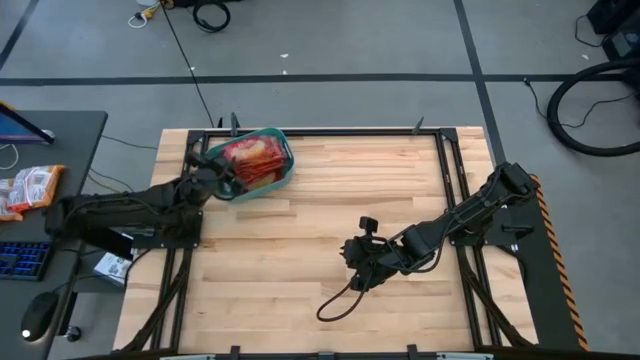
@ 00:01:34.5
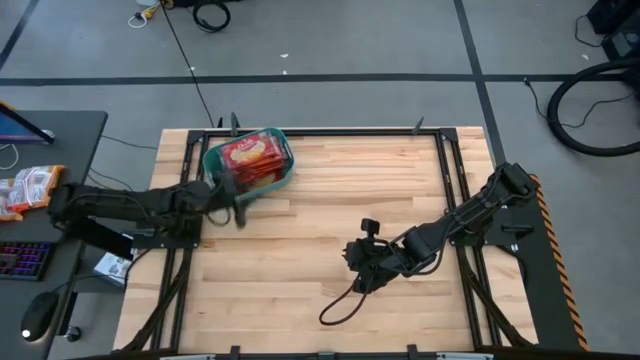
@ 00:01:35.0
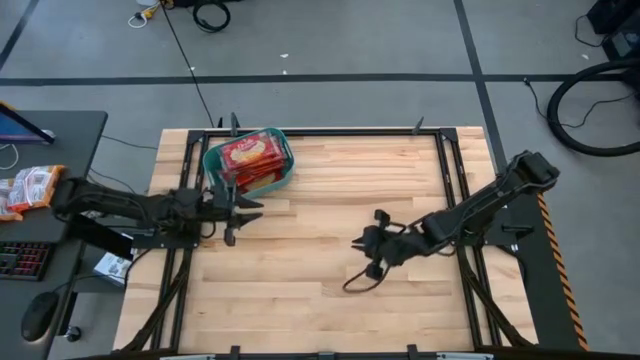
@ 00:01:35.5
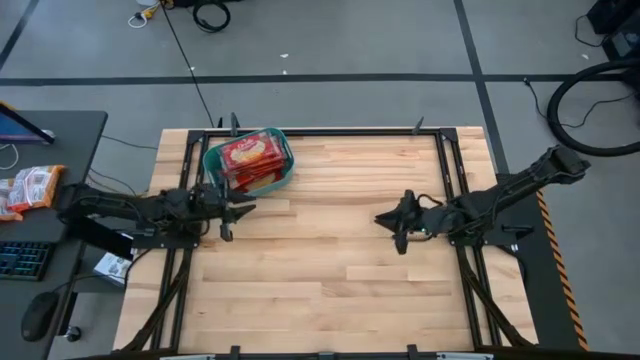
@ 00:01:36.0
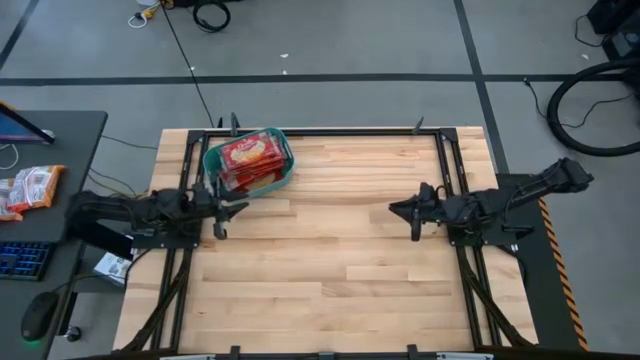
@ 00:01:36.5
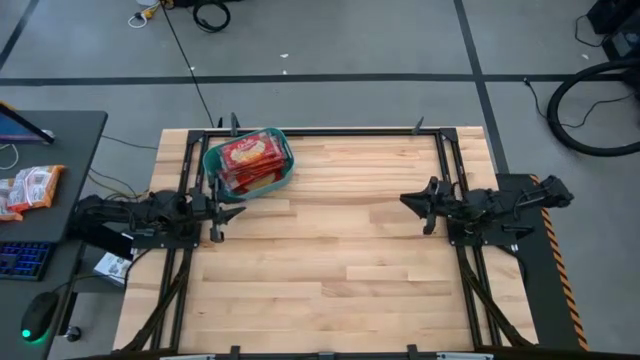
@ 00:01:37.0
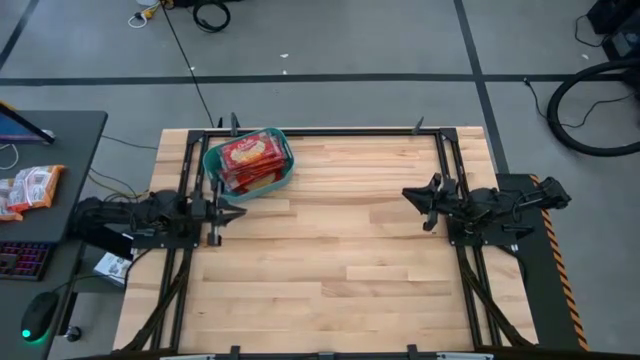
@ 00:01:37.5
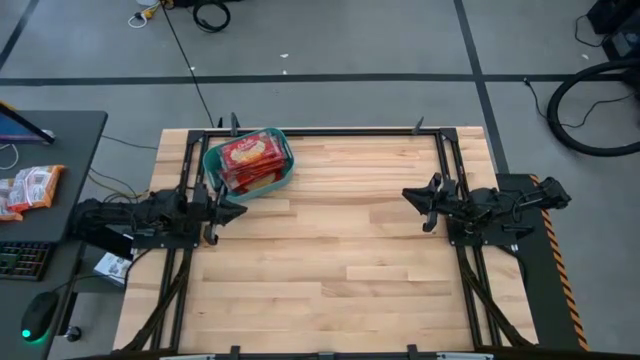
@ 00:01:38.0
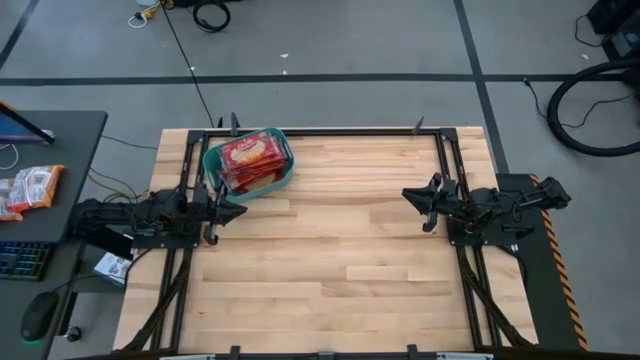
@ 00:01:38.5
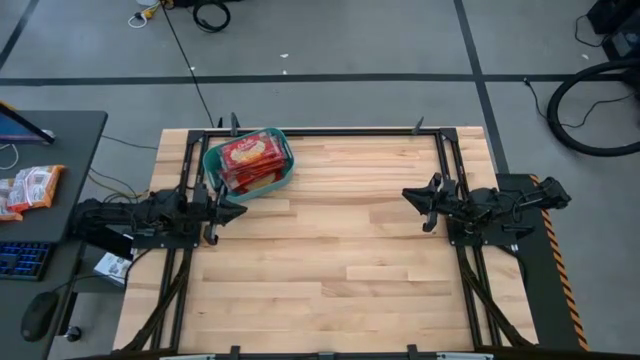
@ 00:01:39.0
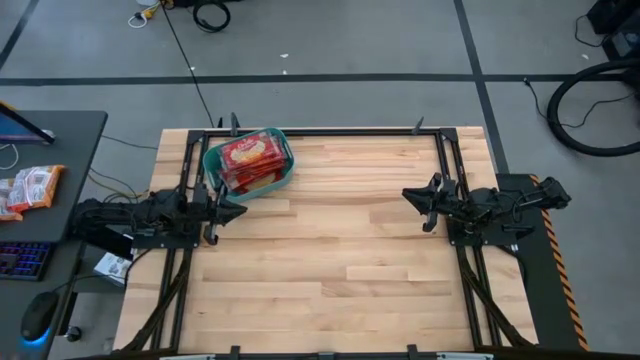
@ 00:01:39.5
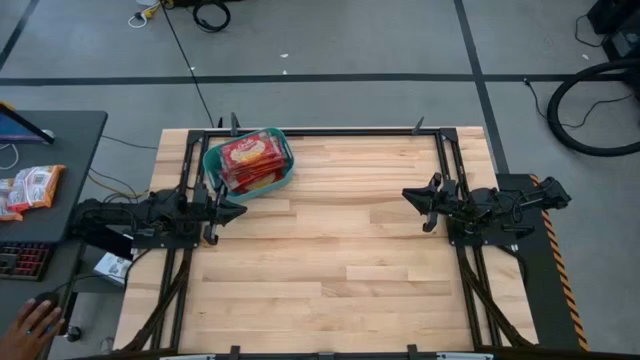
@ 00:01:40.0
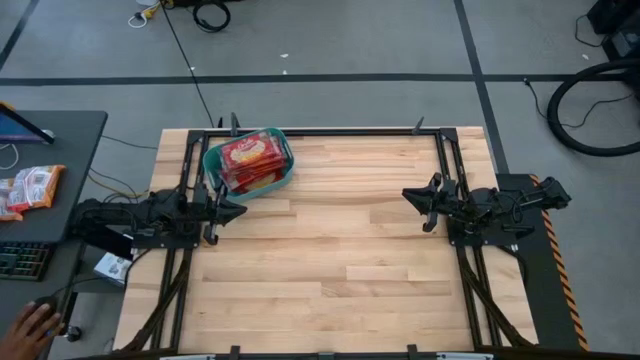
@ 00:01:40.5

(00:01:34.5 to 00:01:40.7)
Task: Sort popcorn bags into baskets
Return to Home Position

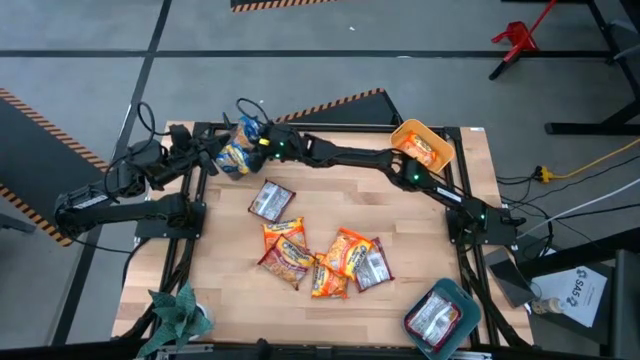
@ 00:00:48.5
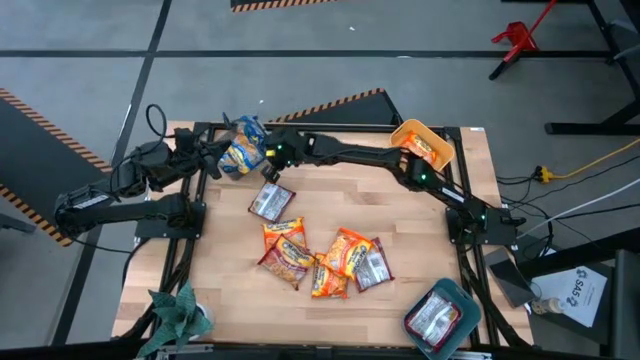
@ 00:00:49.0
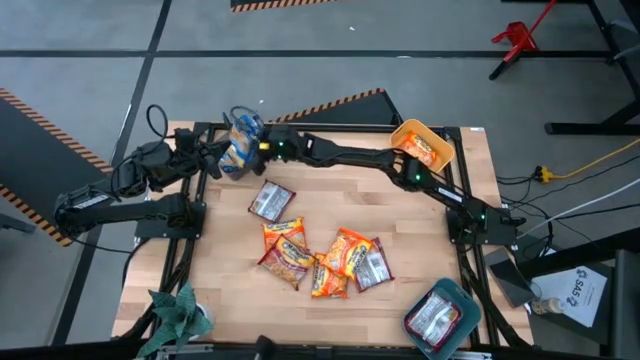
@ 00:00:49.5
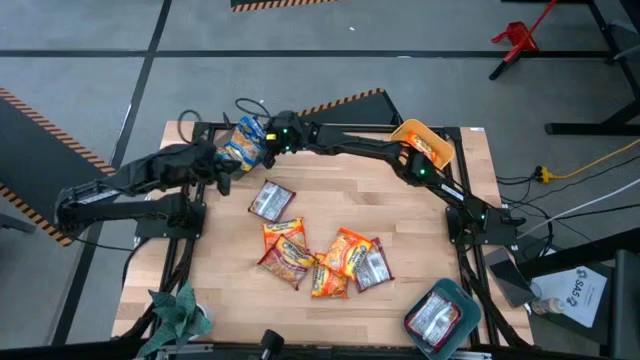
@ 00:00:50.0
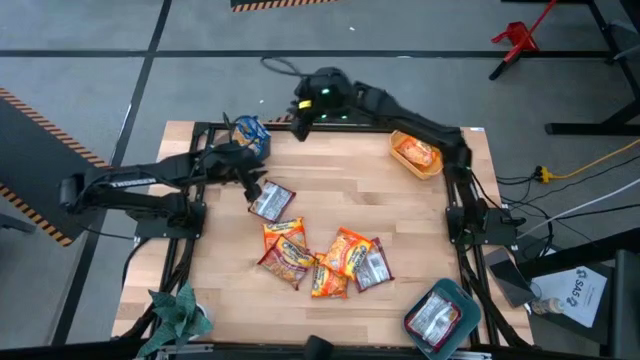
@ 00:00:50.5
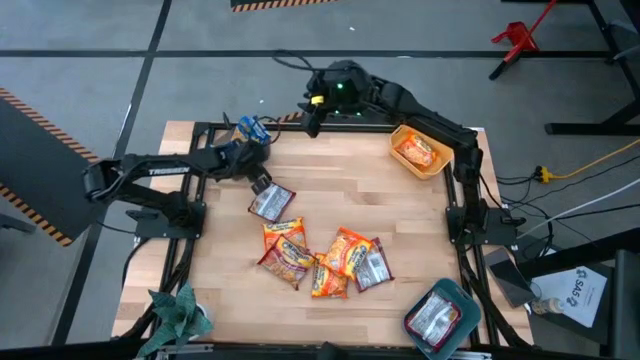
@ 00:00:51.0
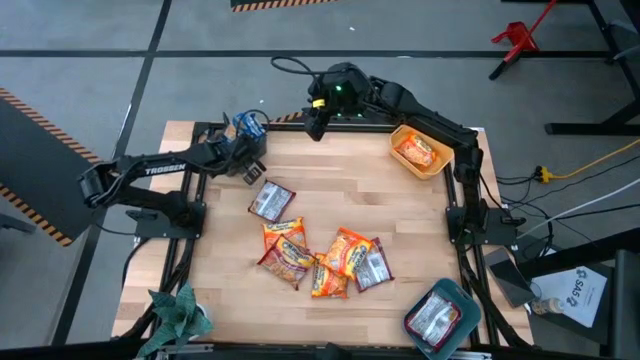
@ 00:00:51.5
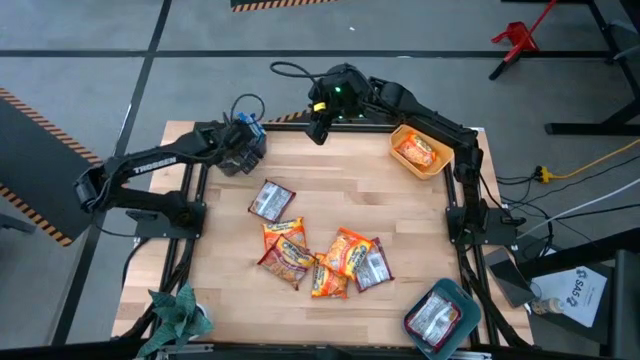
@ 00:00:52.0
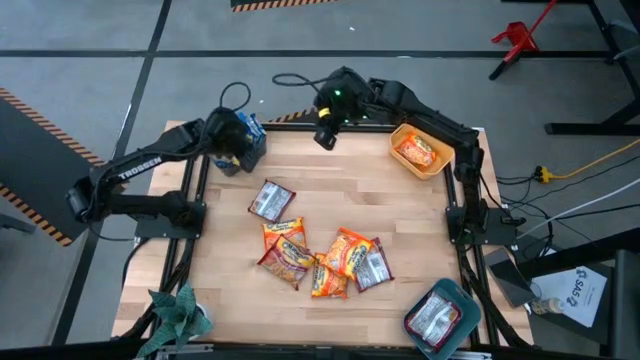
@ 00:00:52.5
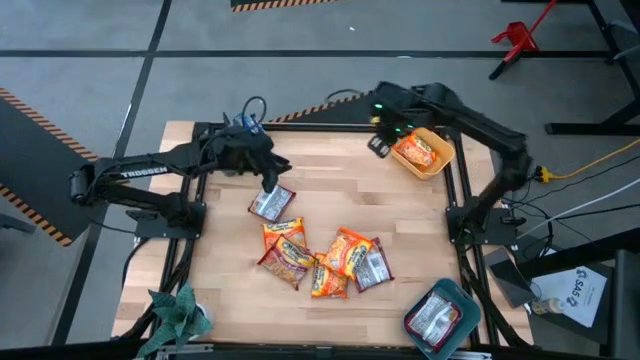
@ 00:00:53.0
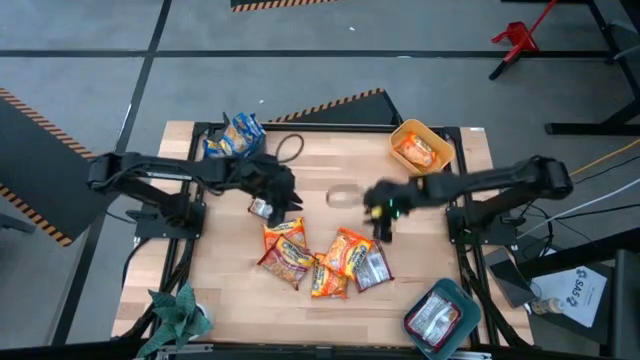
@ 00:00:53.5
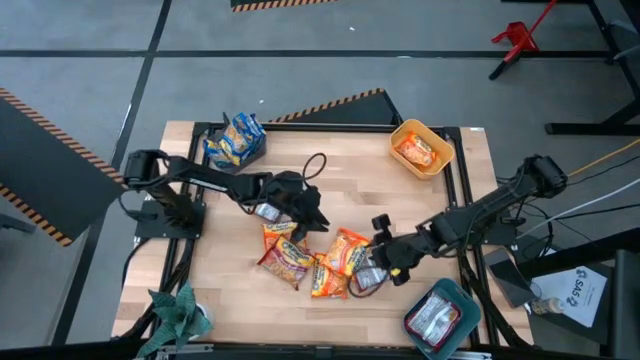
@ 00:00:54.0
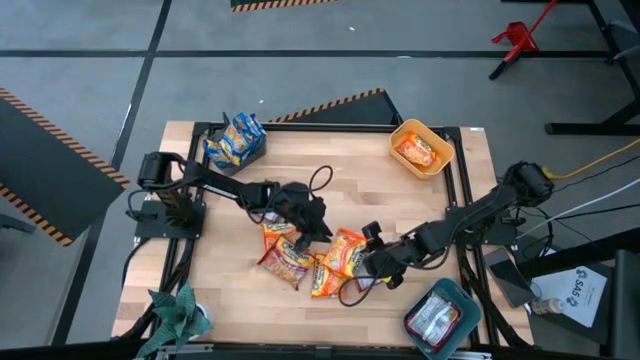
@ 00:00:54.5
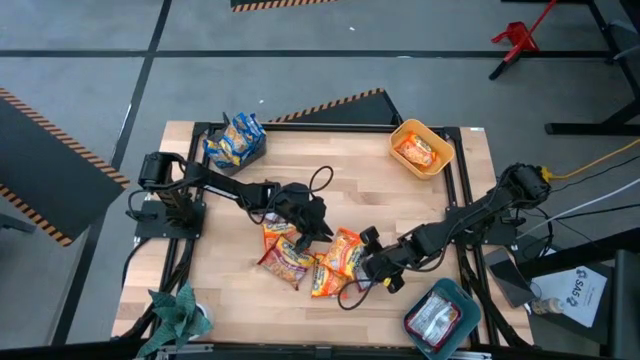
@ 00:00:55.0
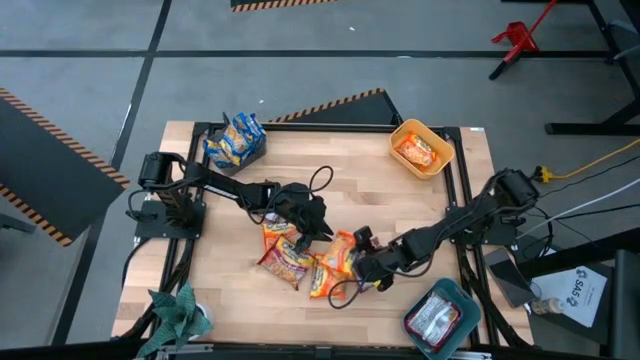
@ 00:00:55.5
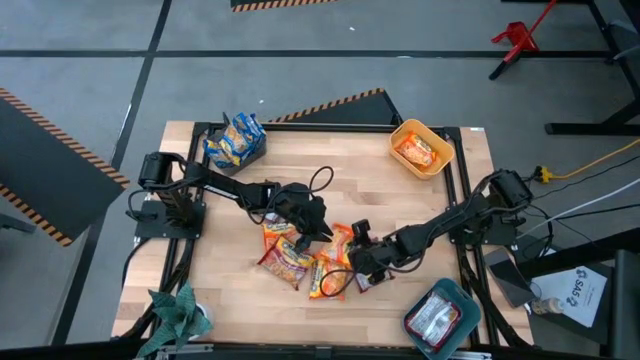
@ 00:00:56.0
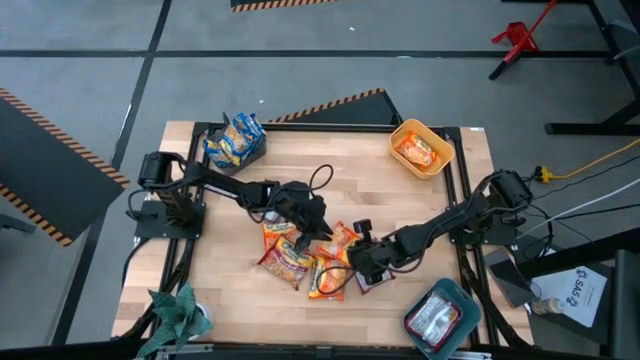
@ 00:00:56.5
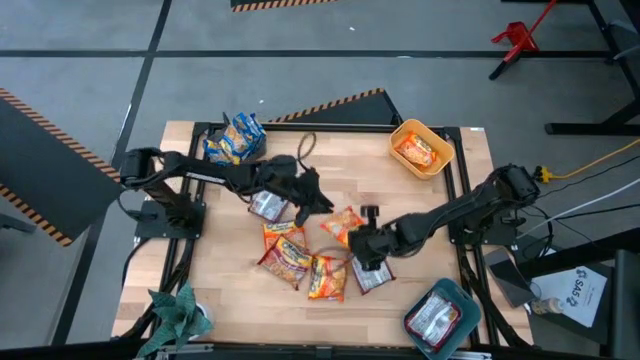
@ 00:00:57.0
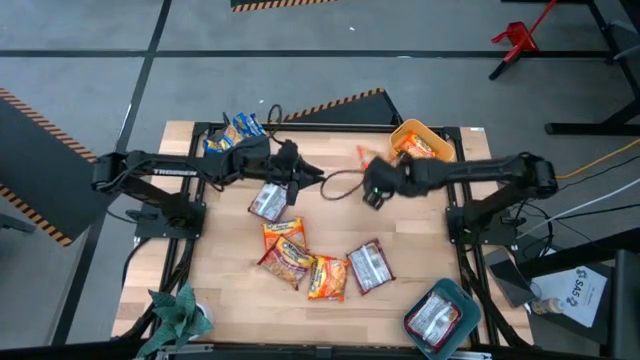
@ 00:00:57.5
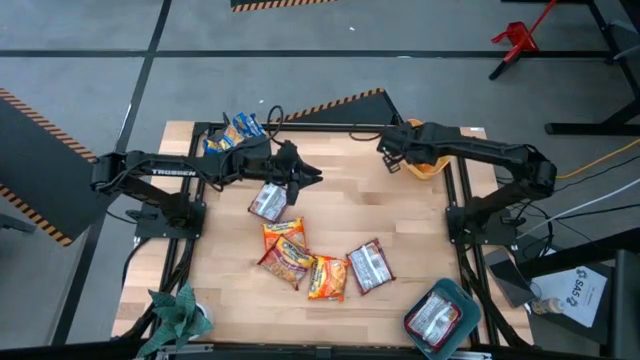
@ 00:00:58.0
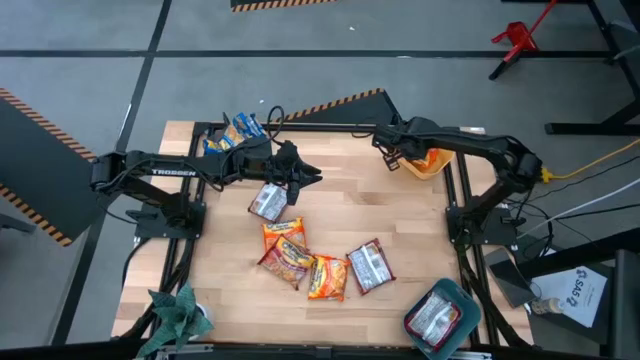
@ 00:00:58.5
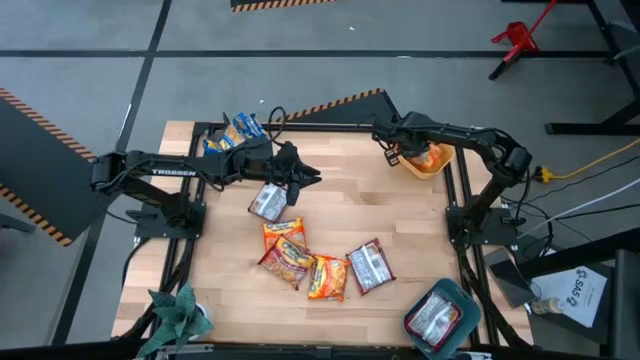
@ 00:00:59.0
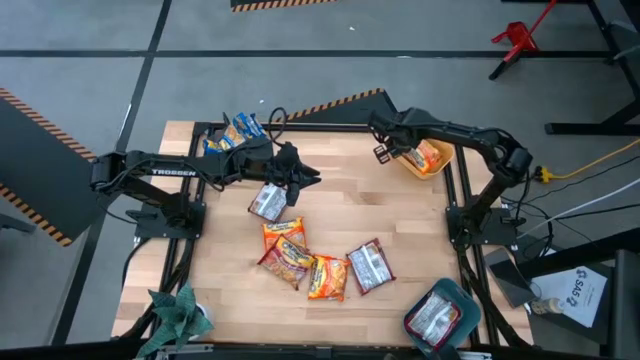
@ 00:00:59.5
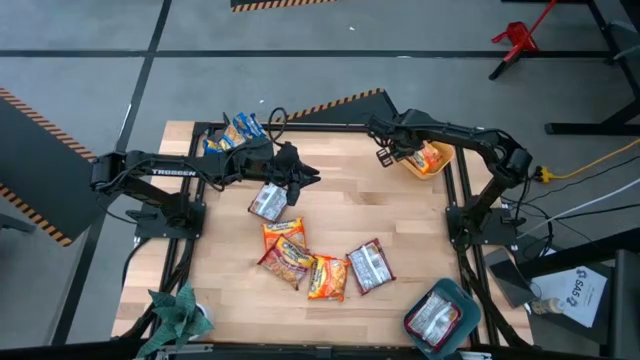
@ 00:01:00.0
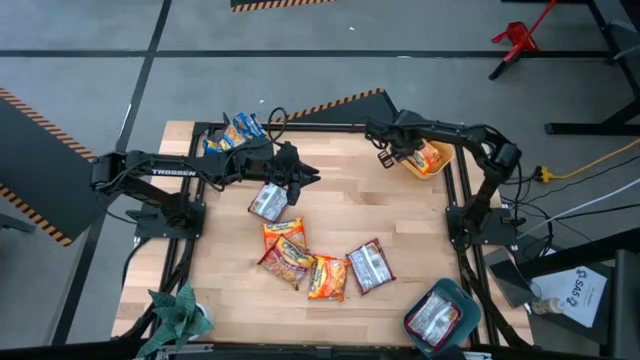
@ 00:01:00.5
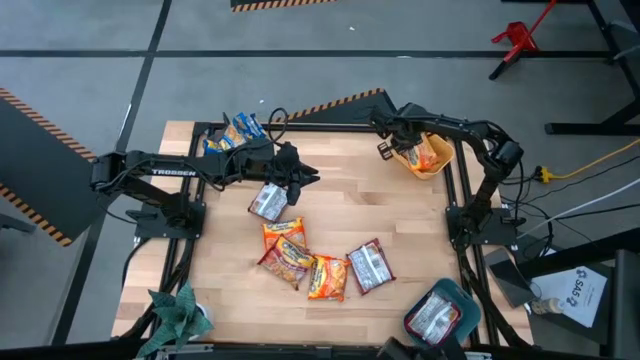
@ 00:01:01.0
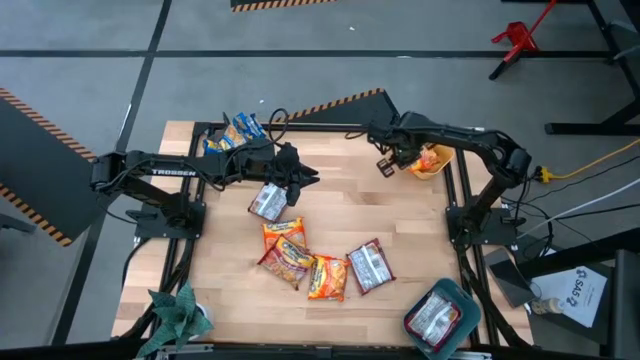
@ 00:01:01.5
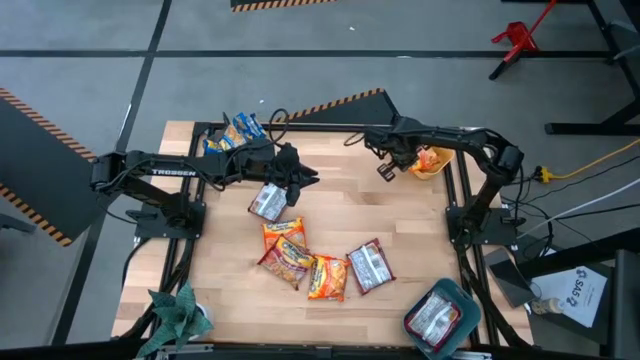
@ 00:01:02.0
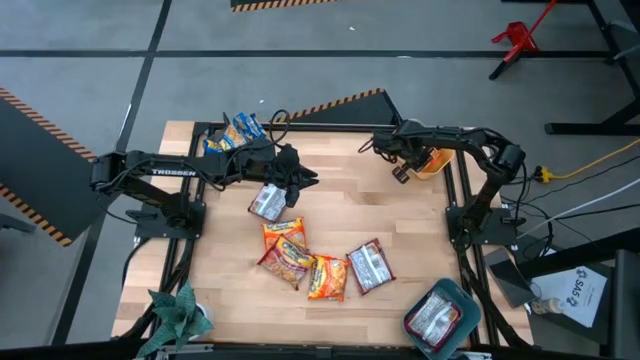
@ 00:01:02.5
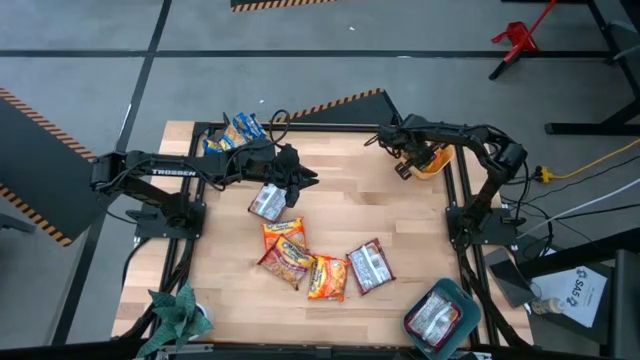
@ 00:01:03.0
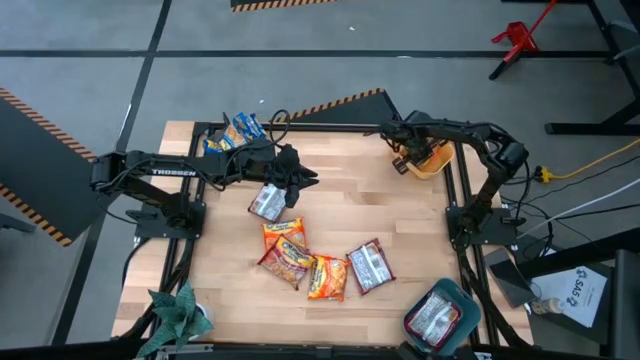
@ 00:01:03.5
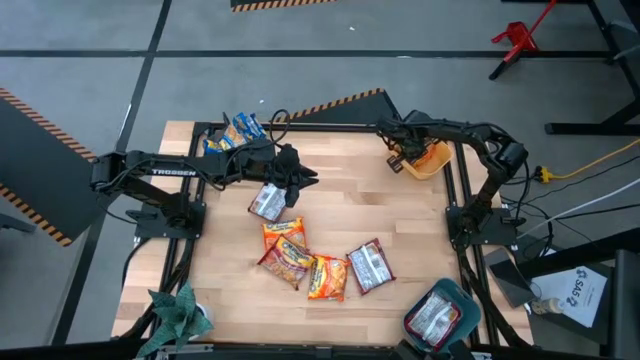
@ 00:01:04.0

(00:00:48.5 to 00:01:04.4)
Task: Sort Maruchan noodles
Put the orange noodle pack into the yellow bin
